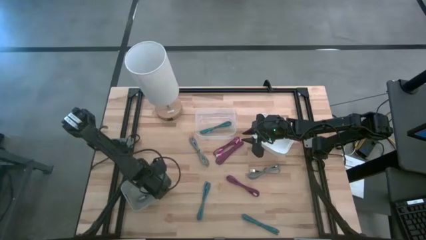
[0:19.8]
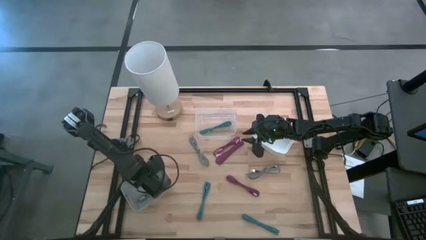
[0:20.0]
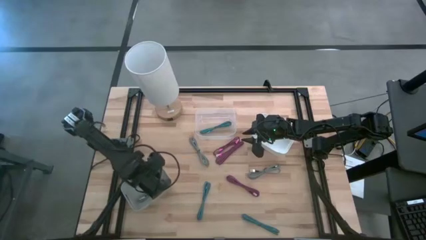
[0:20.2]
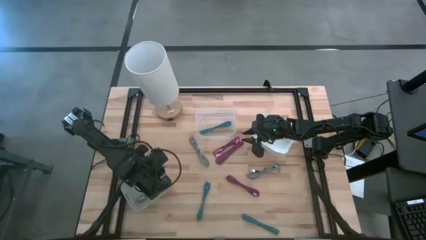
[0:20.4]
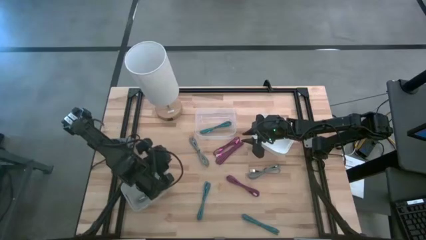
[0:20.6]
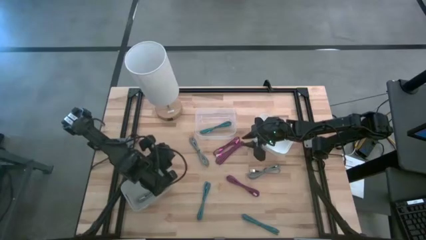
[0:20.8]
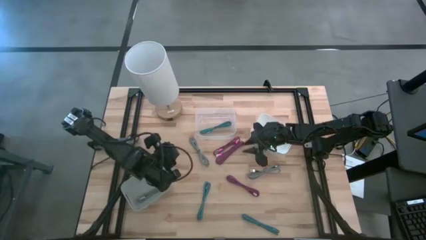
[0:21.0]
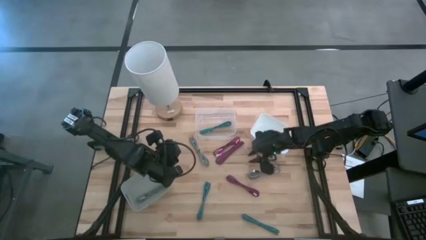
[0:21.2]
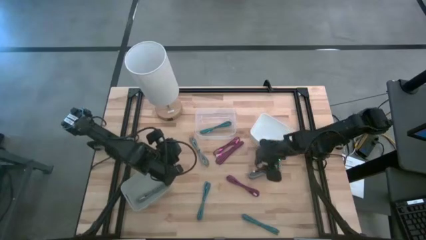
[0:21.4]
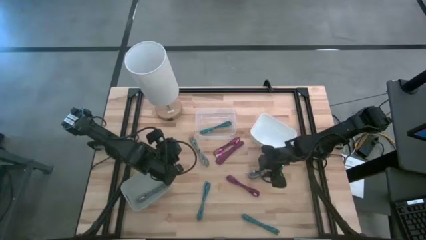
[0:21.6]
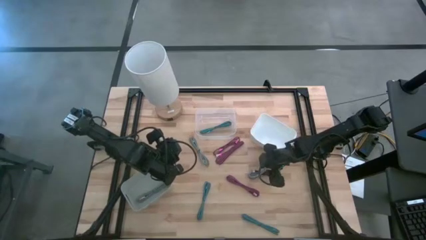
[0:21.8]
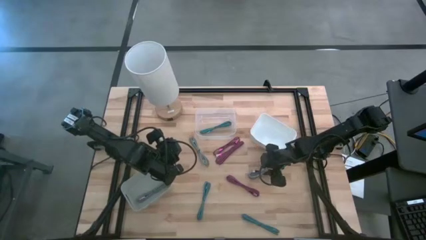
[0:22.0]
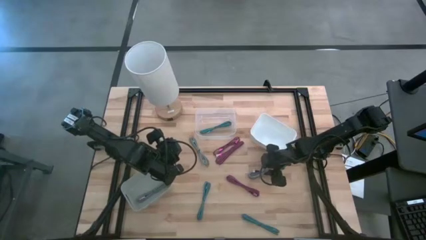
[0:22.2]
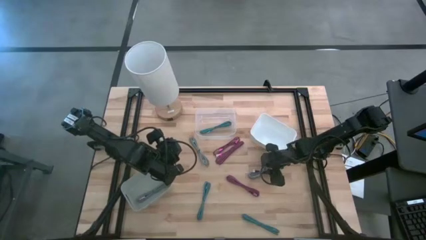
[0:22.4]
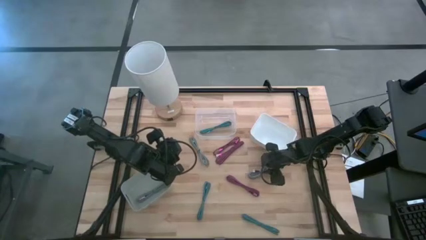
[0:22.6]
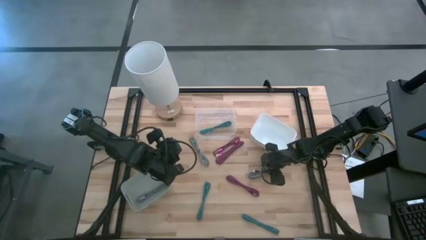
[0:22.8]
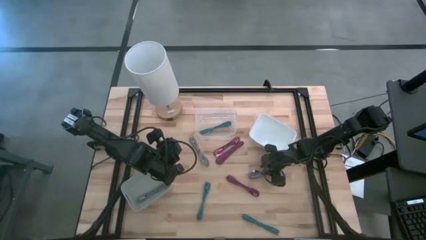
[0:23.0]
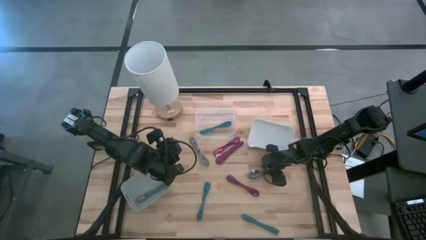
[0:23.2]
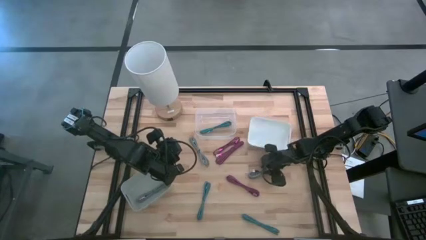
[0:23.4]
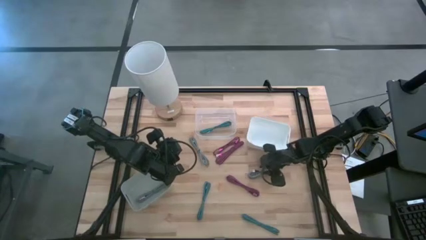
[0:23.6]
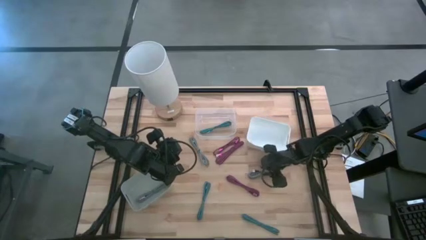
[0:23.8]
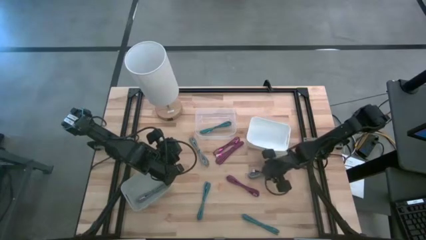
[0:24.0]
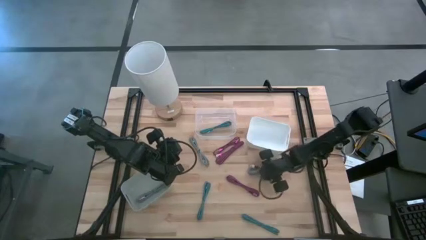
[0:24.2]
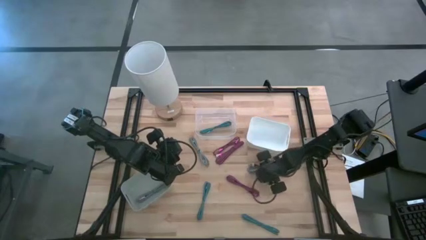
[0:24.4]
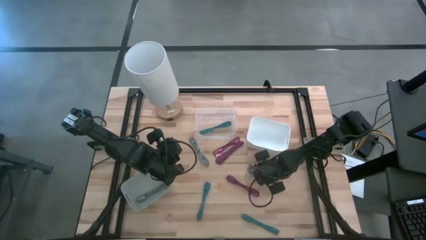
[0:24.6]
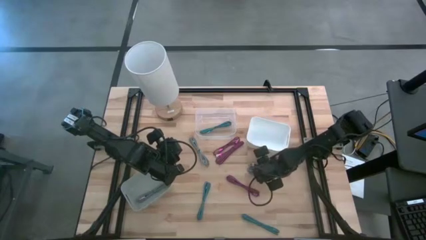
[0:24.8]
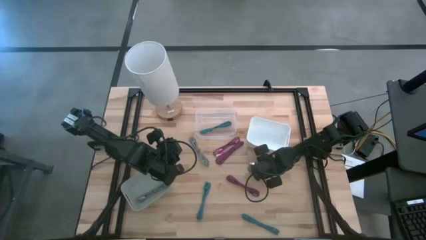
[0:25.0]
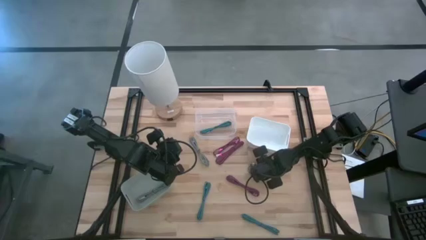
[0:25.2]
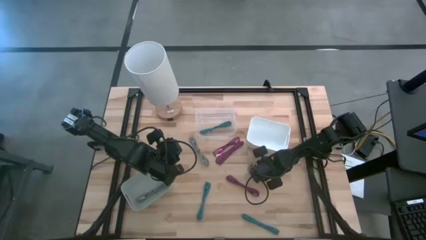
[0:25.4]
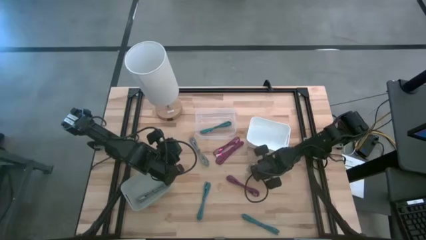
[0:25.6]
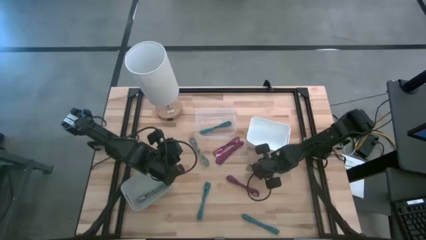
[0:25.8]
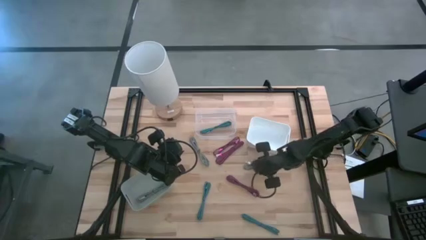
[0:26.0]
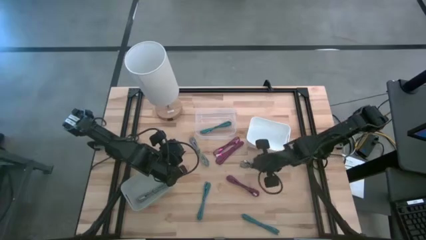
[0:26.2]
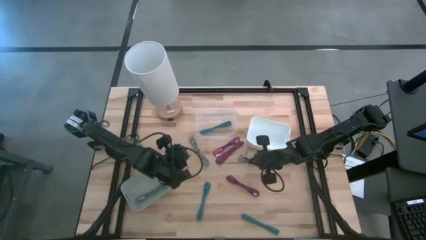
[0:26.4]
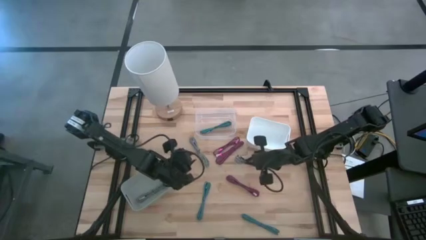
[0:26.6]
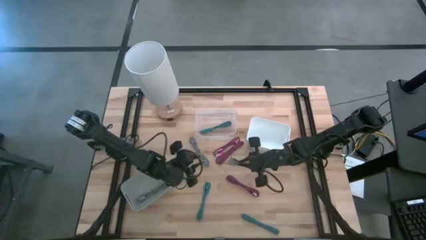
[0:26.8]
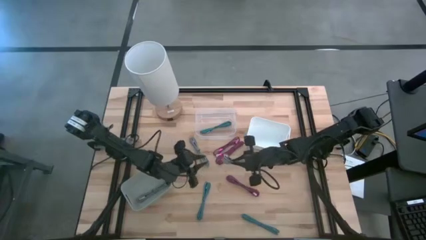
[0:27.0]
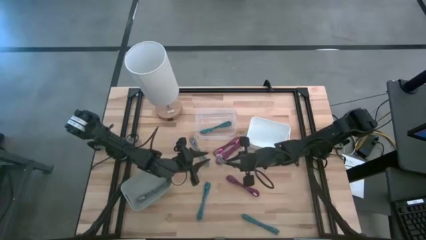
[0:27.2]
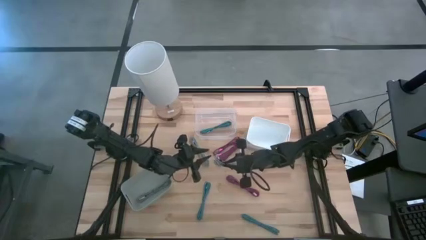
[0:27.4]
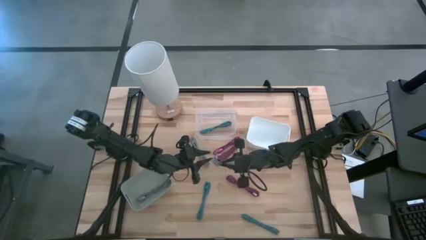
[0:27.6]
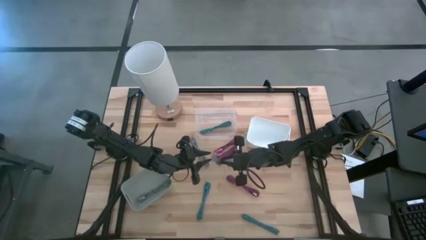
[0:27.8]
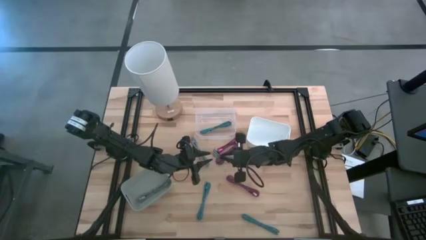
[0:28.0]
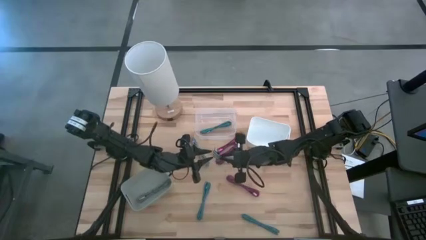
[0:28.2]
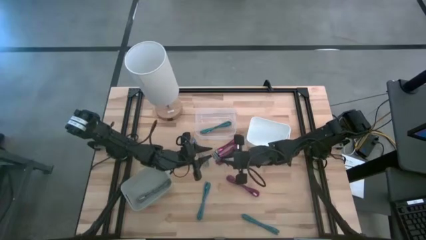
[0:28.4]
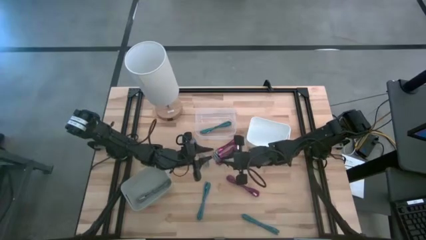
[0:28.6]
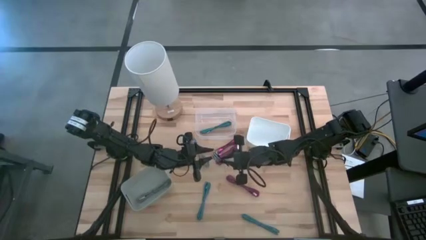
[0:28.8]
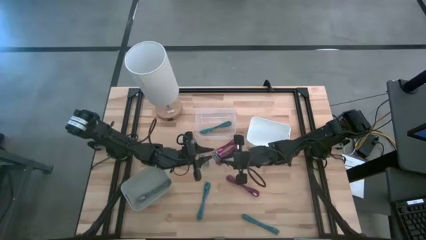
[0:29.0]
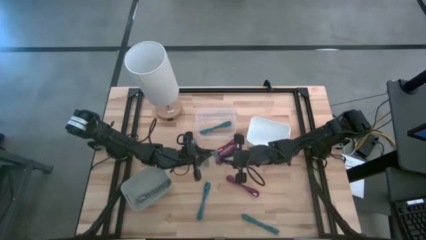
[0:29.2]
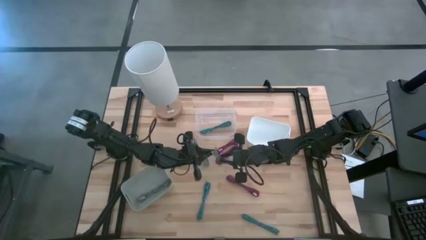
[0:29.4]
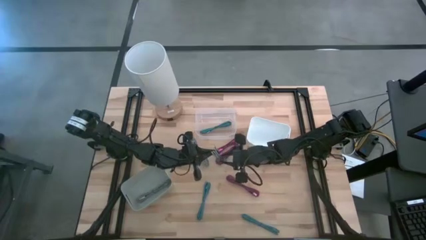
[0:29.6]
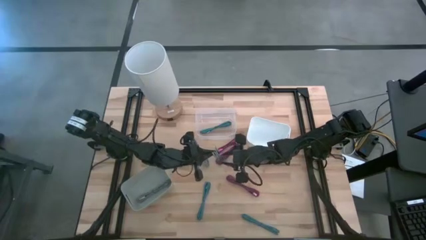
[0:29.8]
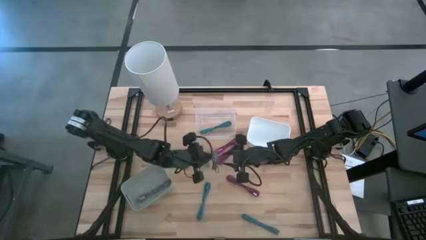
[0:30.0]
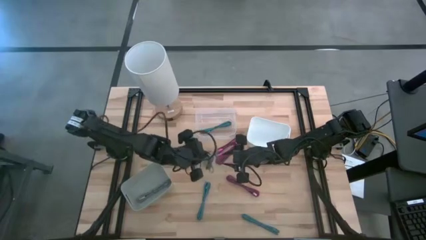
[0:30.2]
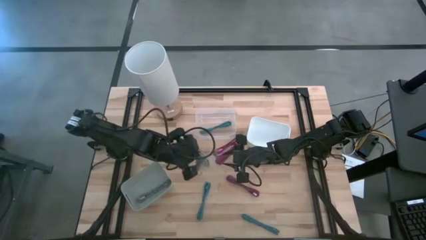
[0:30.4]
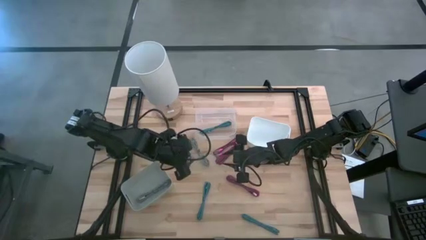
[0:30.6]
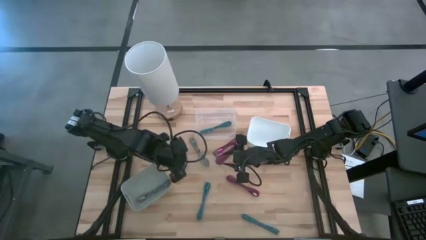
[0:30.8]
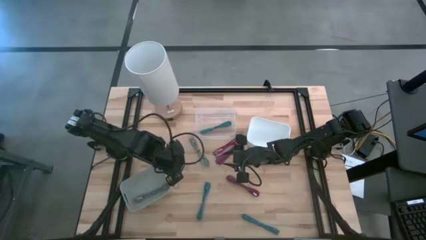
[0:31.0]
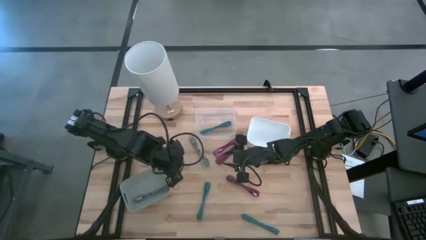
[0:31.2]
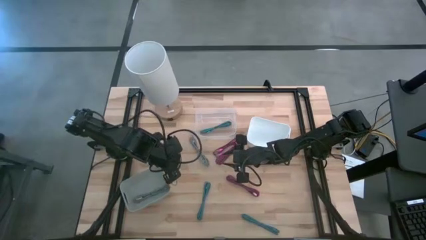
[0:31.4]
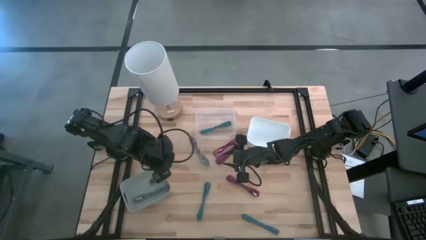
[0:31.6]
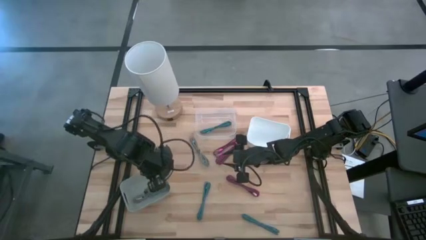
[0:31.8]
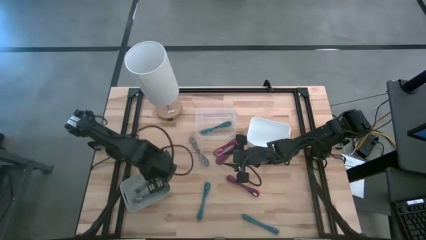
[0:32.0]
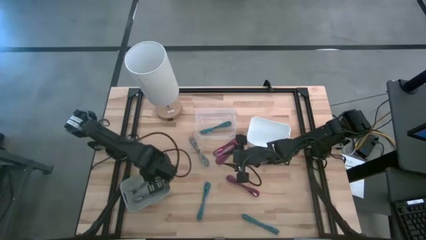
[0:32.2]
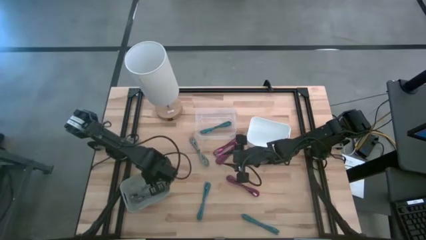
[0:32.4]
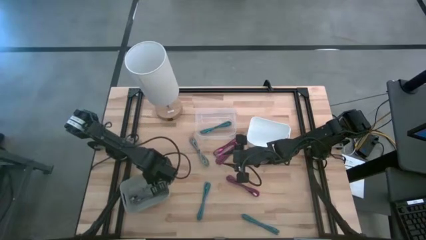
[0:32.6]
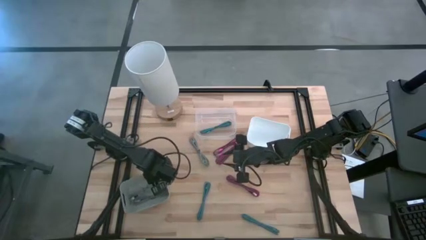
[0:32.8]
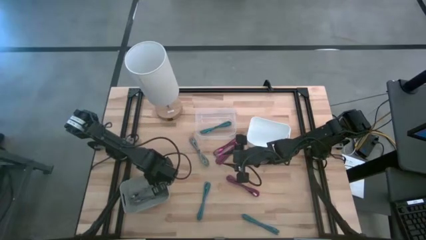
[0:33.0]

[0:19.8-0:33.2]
Task: Pick & Place USB Port
Put the right white USB cable into the gray bin

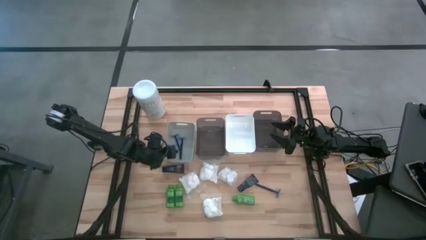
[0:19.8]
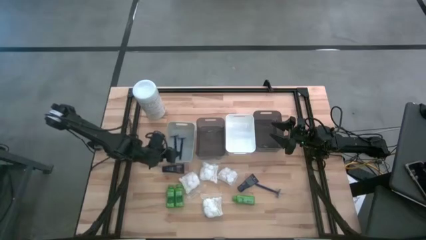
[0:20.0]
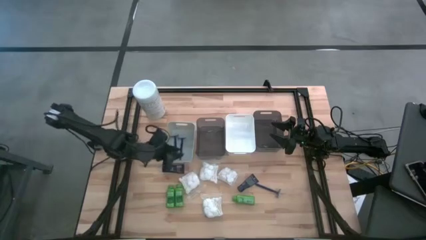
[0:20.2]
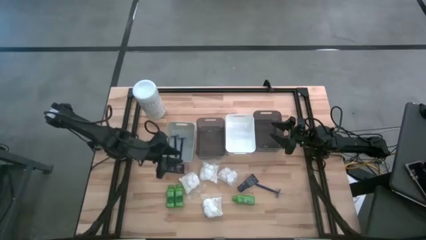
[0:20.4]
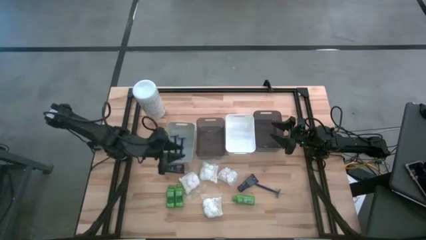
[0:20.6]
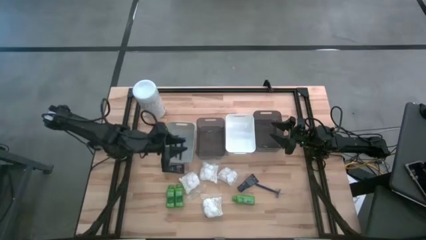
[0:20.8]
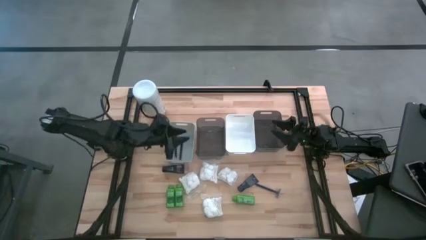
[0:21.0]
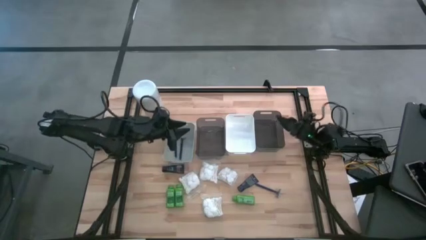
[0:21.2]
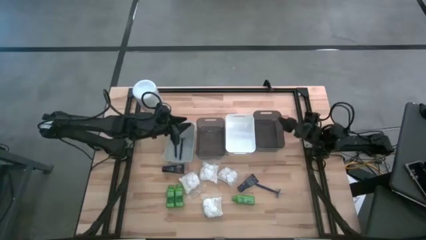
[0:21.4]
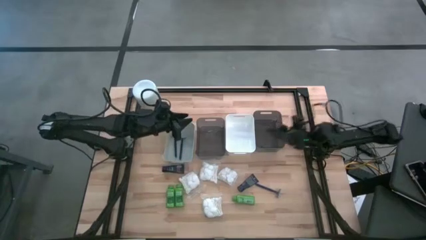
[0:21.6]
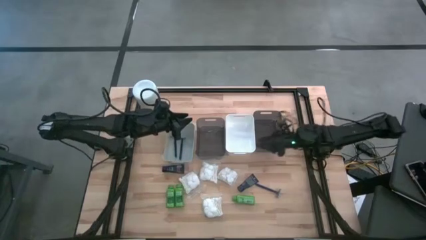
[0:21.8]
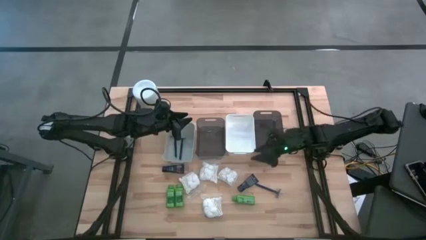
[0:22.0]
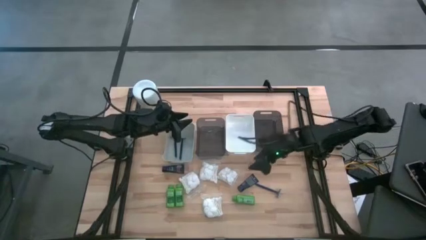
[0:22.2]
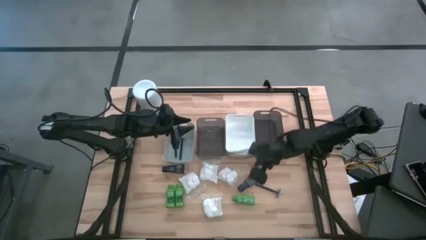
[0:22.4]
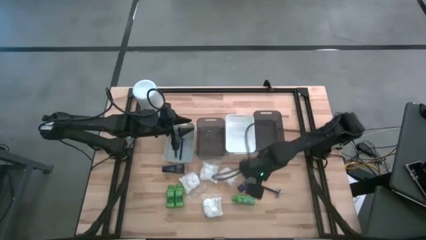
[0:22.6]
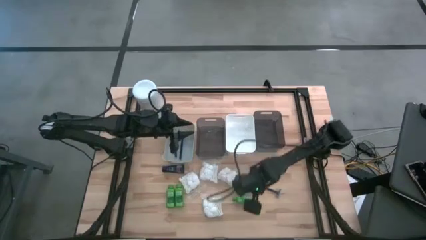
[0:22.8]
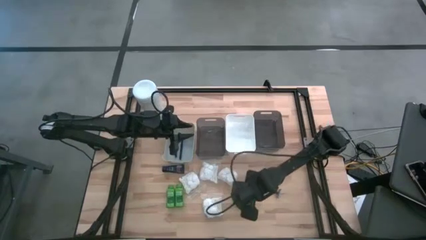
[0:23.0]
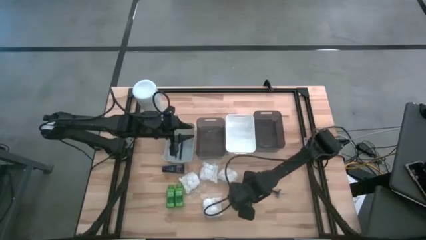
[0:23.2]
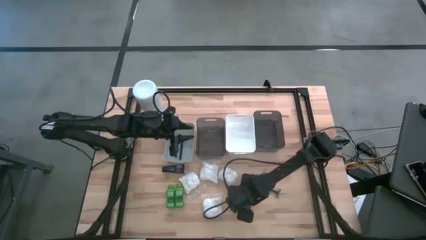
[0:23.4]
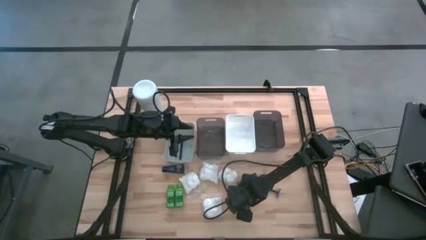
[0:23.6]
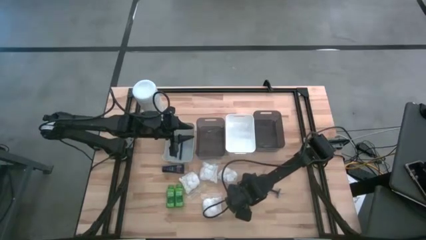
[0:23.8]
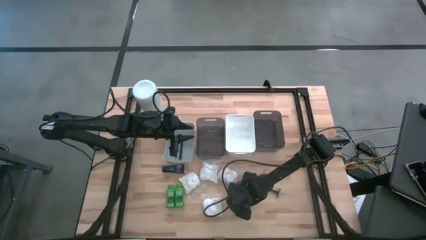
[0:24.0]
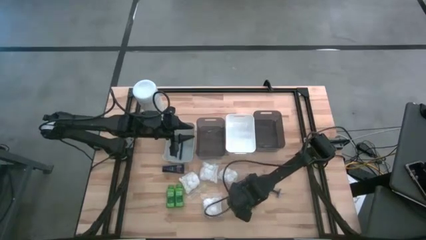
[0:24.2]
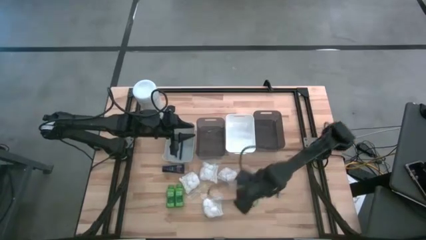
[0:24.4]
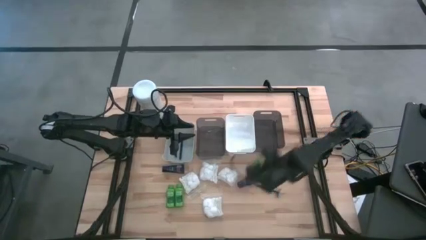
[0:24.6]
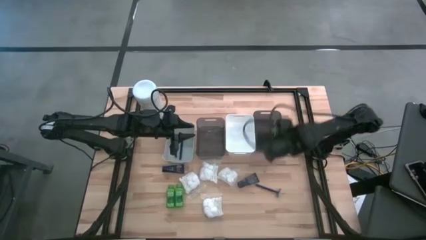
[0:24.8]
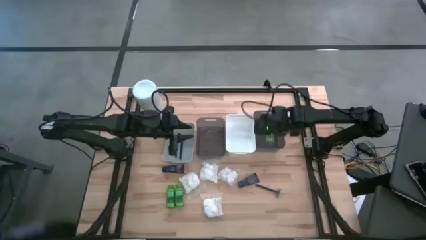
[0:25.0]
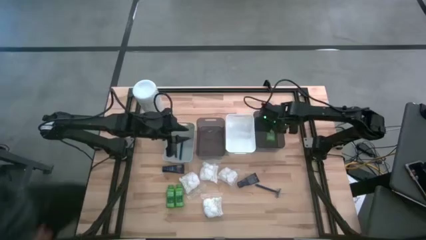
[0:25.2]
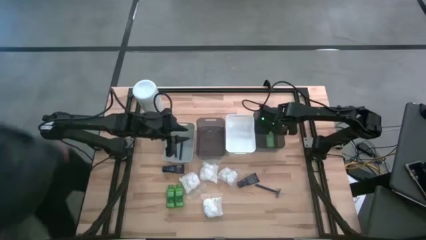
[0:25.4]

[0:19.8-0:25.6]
Task: Pick & Place Travel size toiletries
Put the right shampoo into the right black bin
